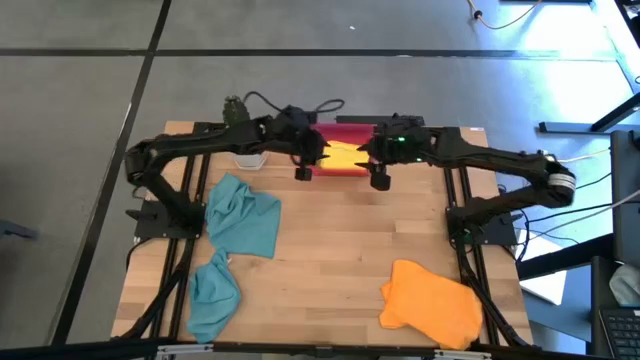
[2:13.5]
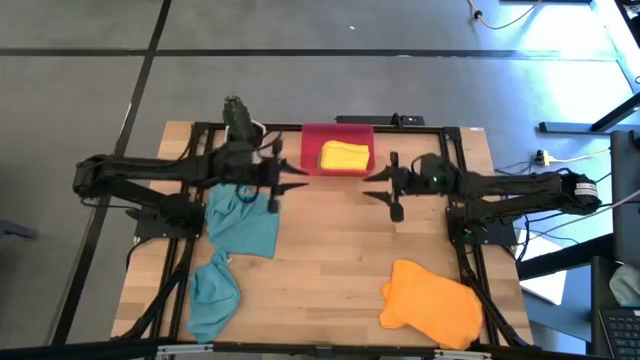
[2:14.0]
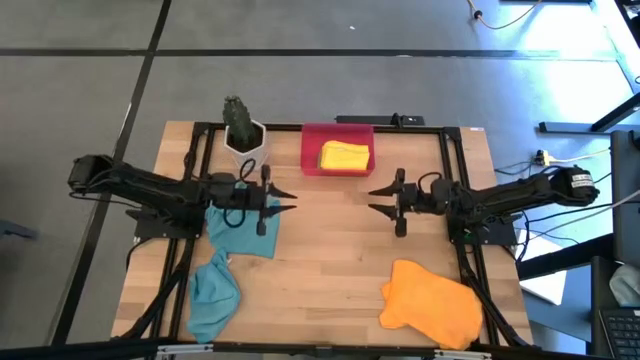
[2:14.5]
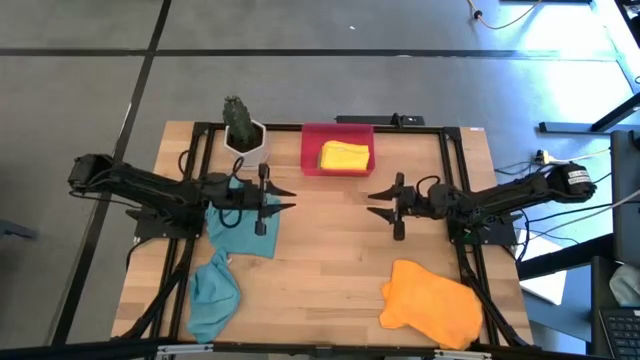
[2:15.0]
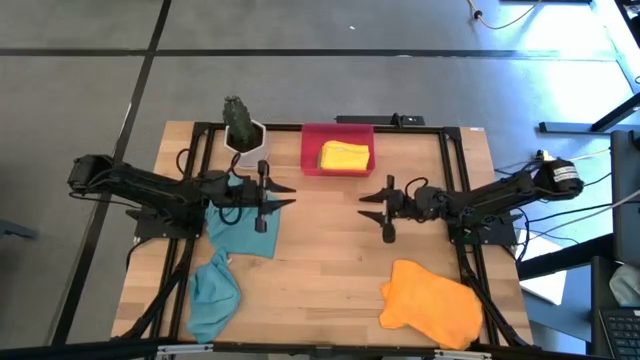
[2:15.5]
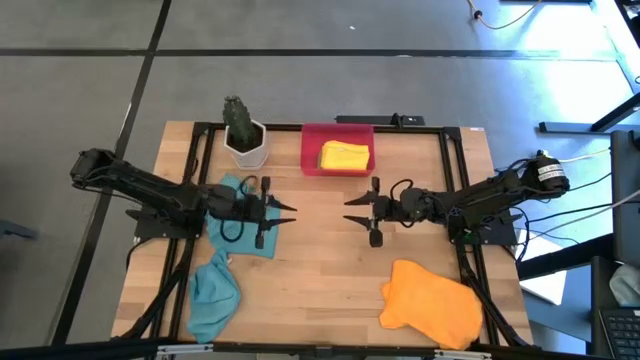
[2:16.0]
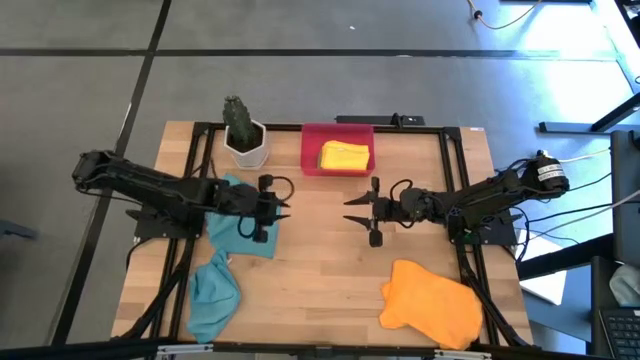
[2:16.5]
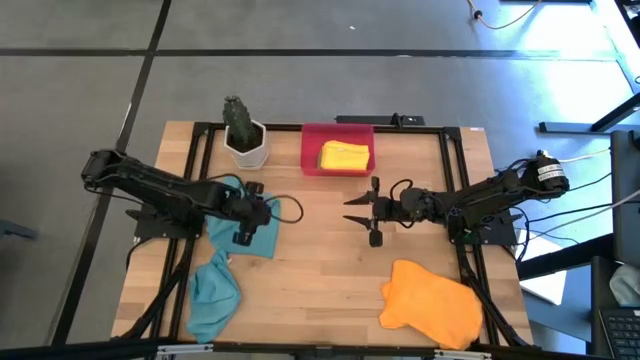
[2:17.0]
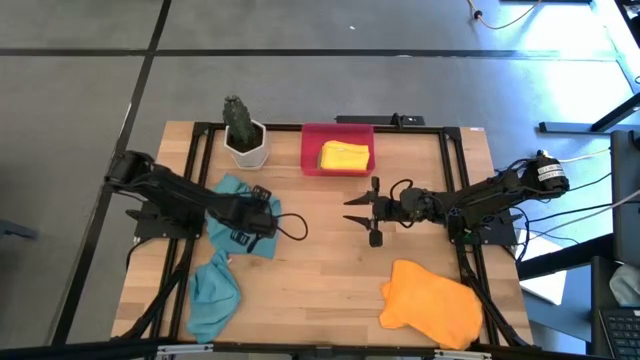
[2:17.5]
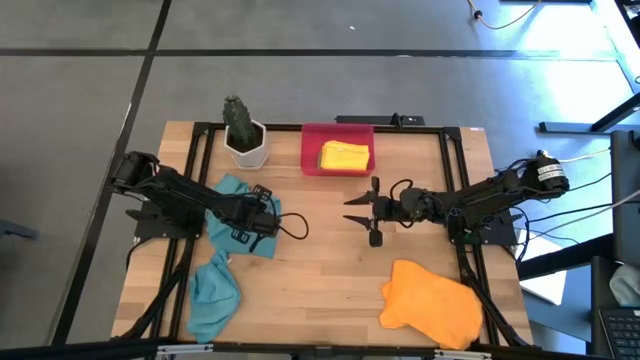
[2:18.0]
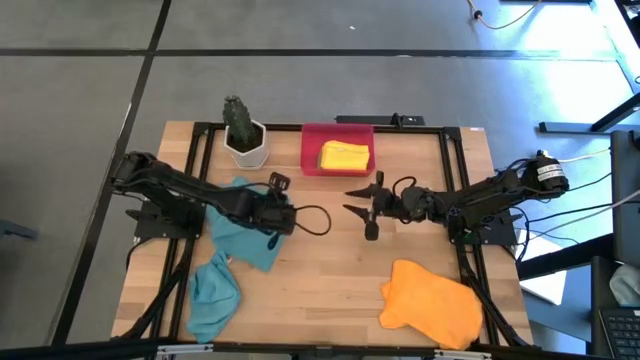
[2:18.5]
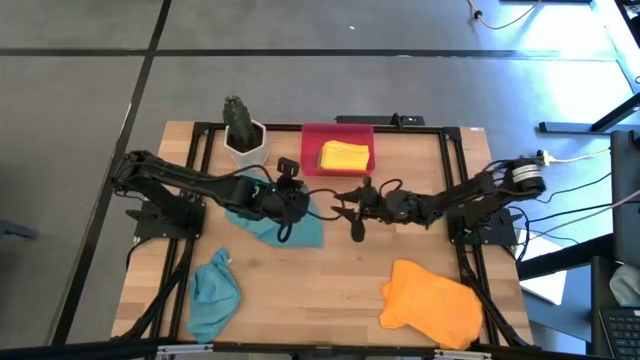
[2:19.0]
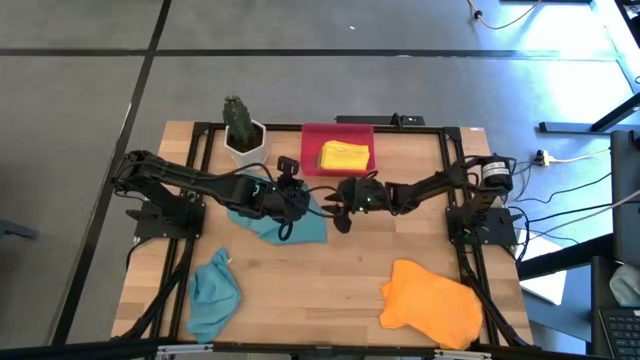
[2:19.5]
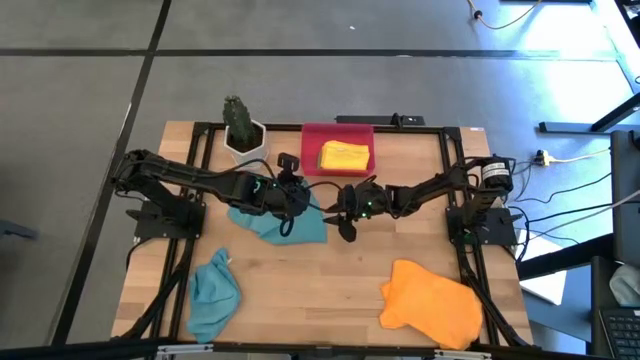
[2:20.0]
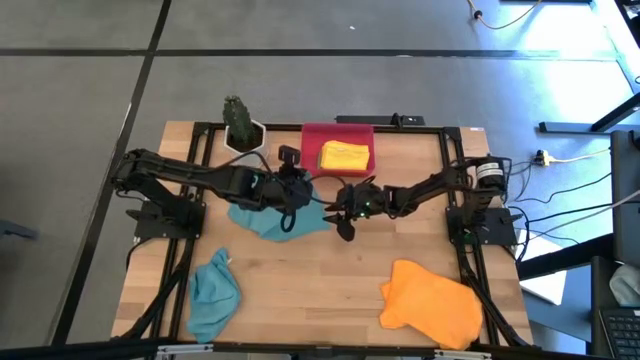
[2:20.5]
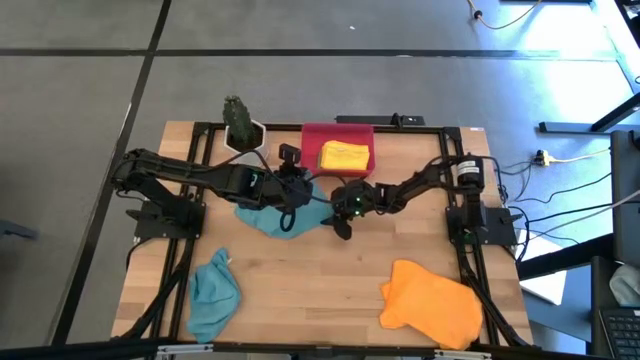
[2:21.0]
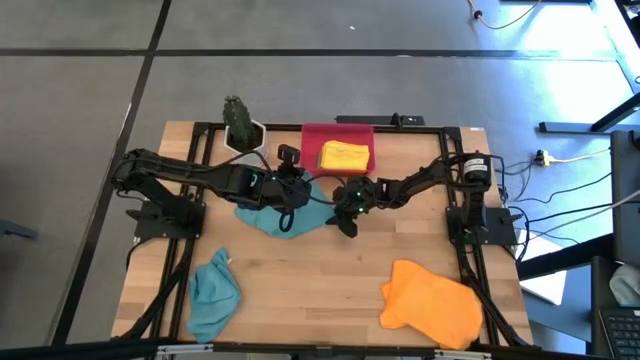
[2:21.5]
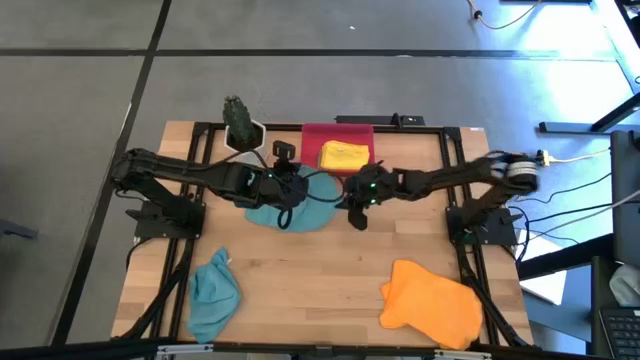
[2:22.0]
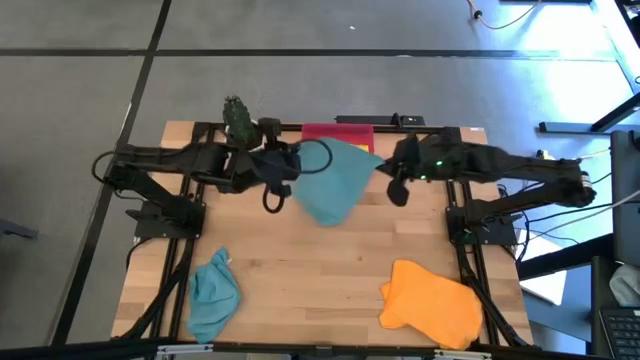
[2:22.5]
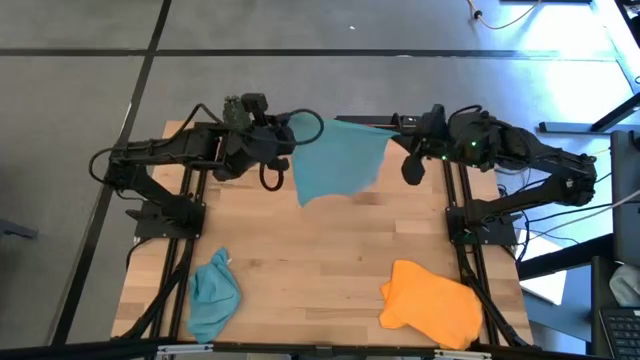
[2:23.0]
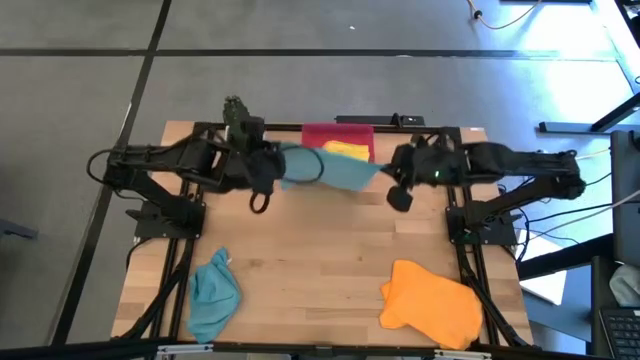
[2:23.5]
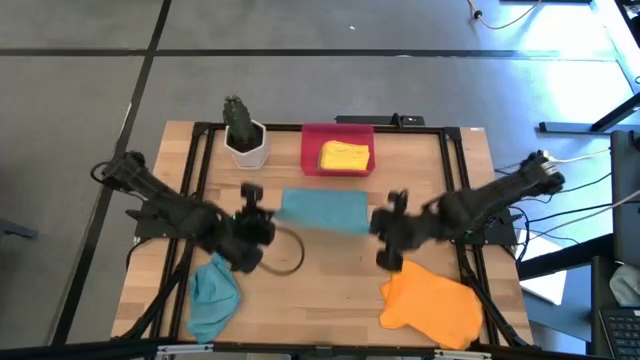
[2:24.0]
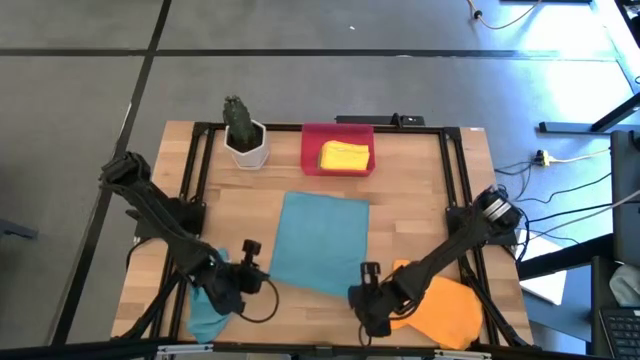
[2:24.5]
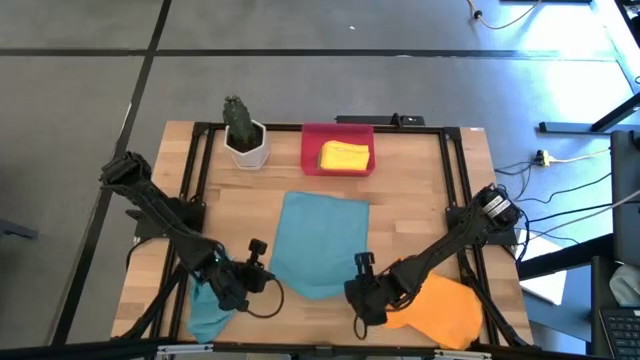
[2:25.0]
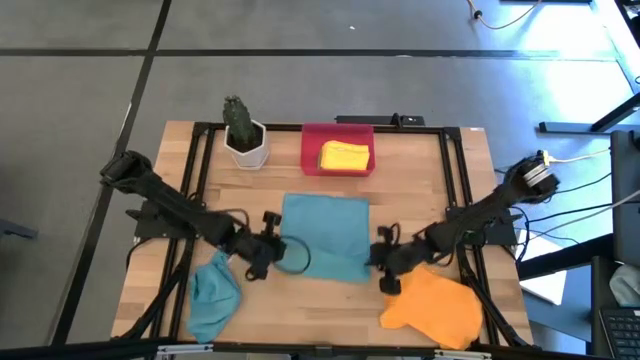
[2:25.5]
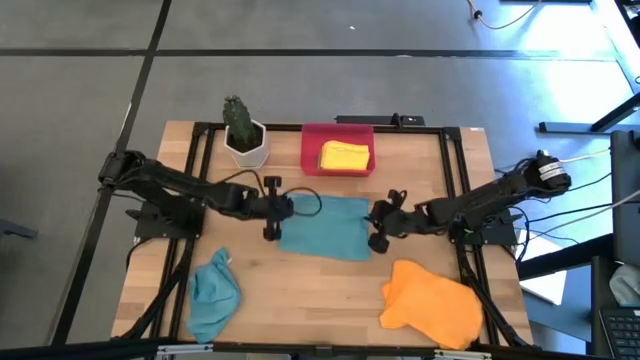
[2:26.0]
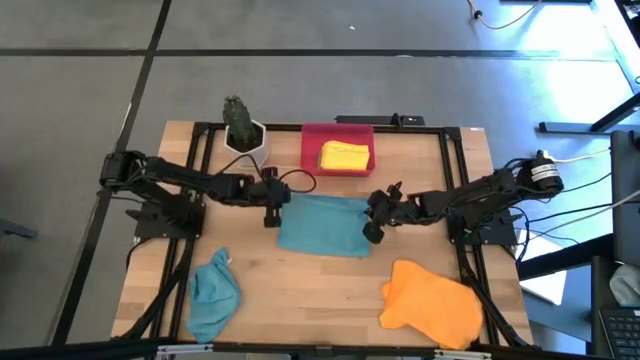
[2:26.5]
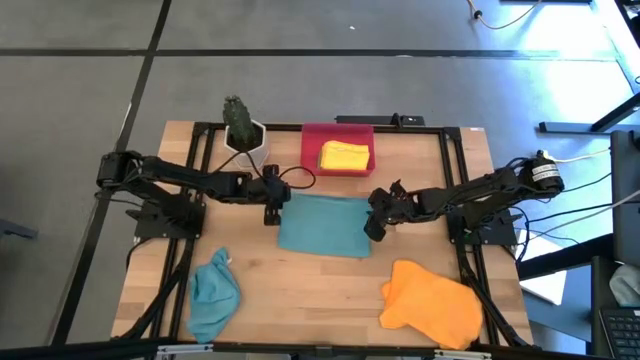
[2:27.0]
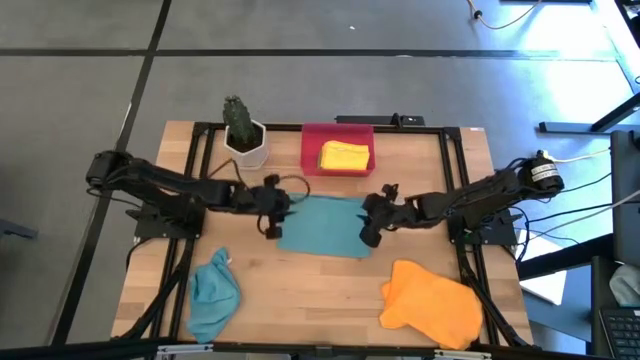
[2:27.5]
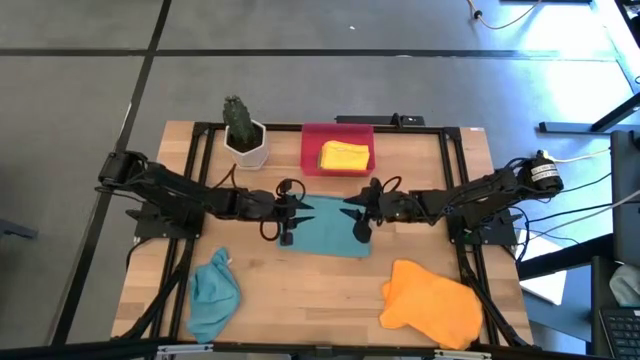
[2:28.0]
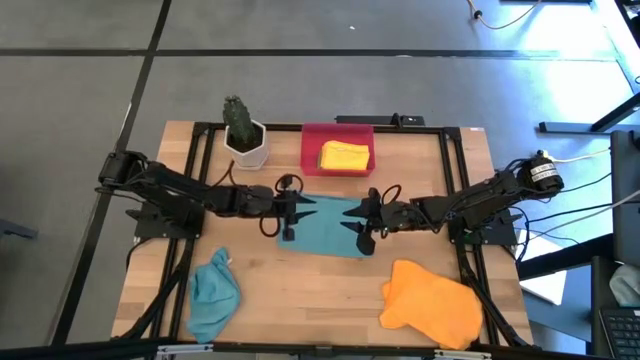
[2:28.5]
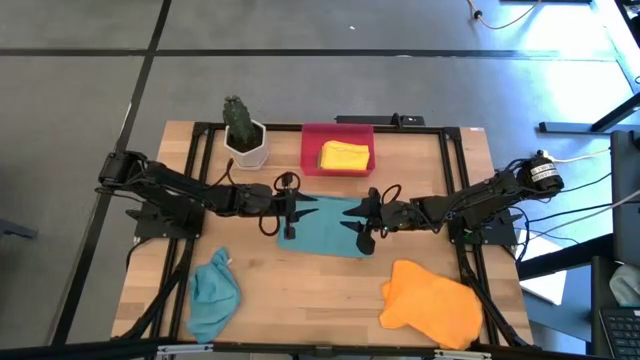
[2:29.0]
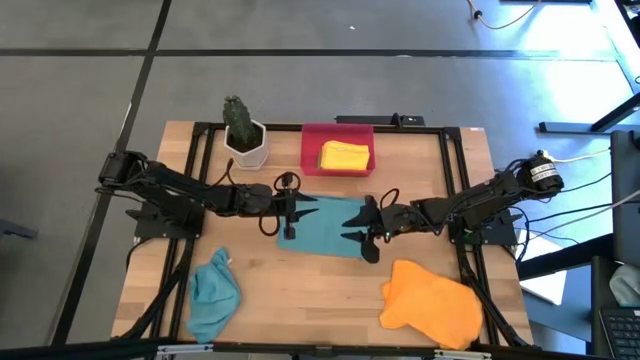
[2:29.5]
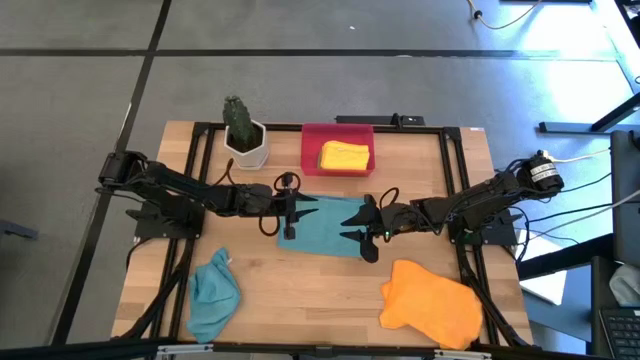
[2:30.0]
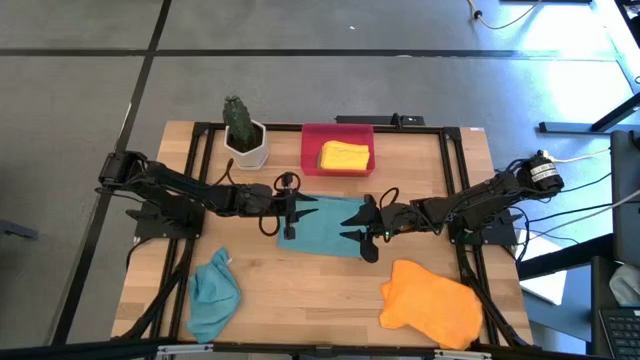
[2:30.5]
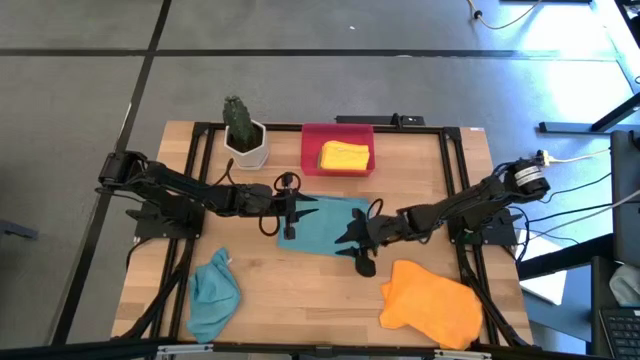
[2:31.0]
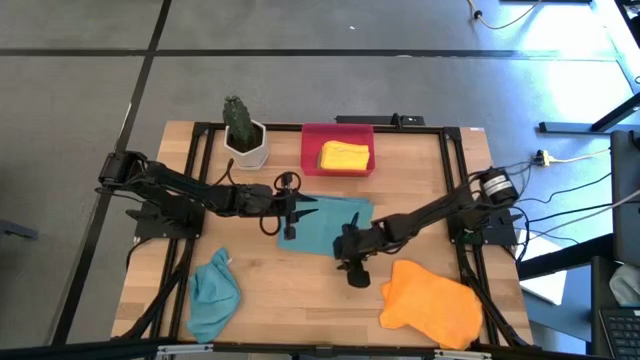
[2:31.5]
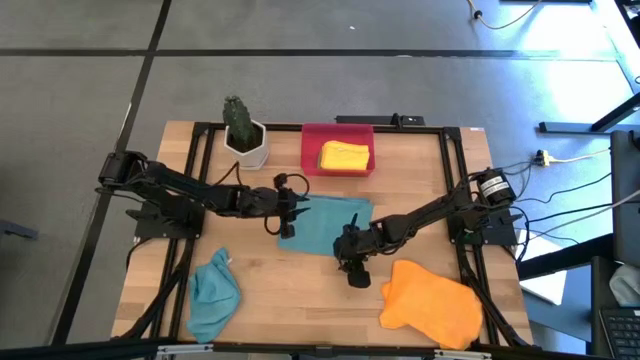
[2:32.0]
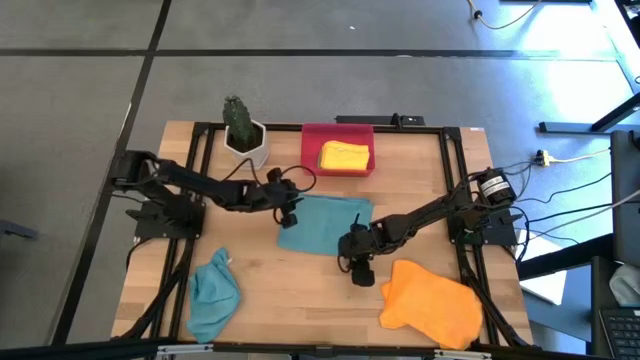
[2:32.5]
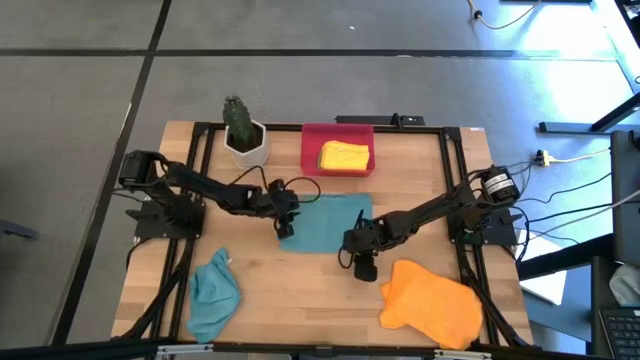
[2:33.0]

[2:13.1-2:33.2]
Task: Fold microfiber towels
Fold the top blue microfiber cloth

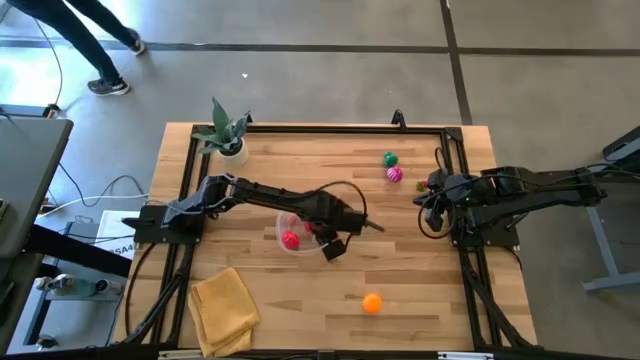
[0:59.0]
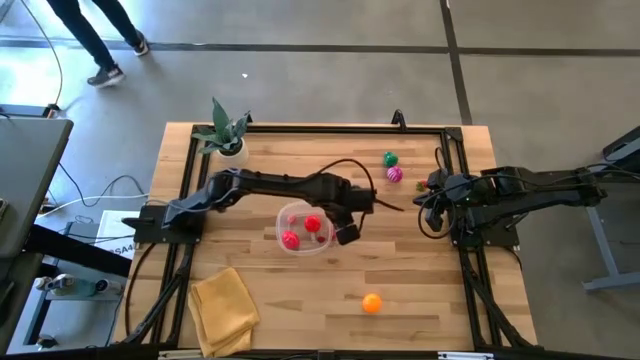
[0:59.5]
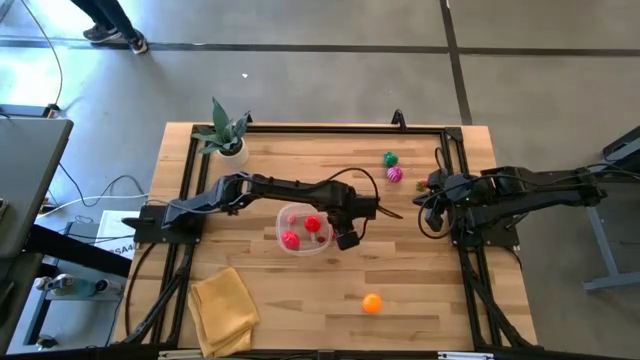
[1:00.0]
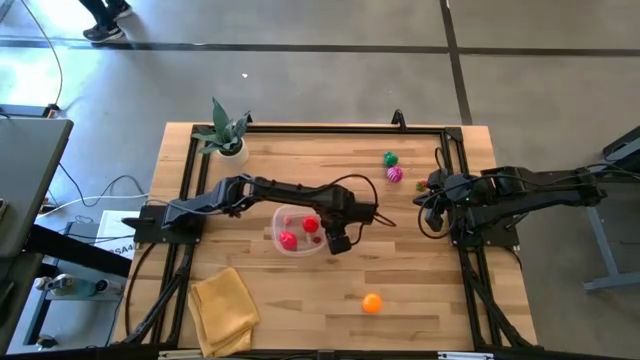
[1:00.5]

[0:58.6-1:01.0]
Task: Pick and placing Produce into tupperware
Adjust the transparent container
